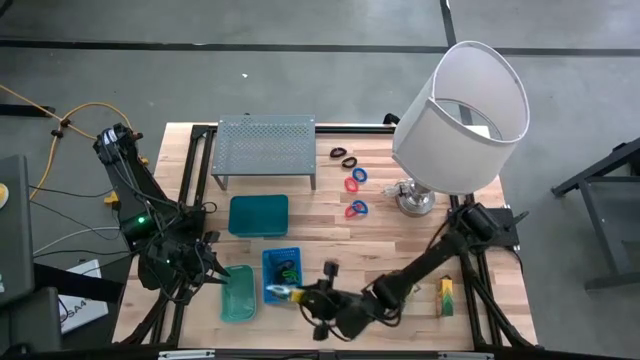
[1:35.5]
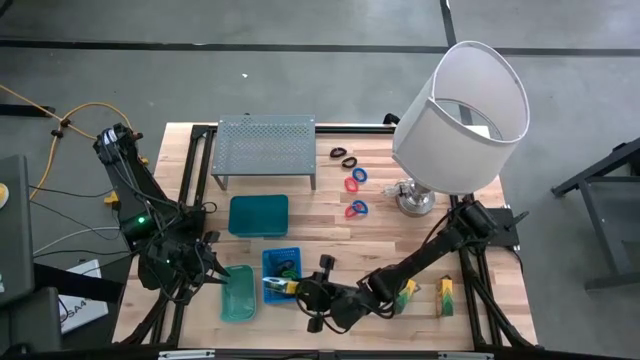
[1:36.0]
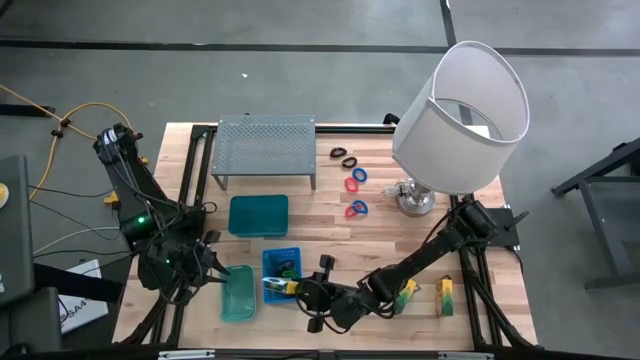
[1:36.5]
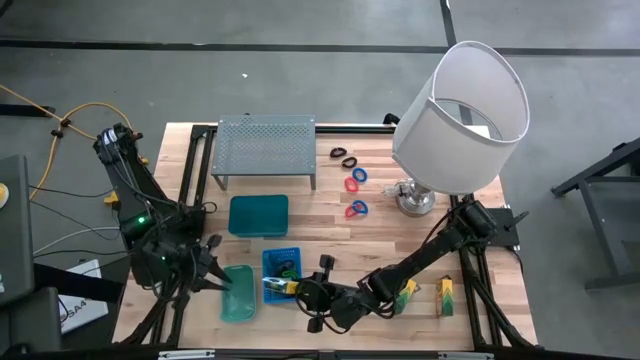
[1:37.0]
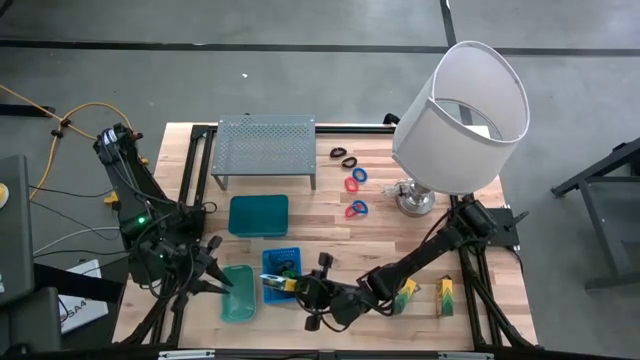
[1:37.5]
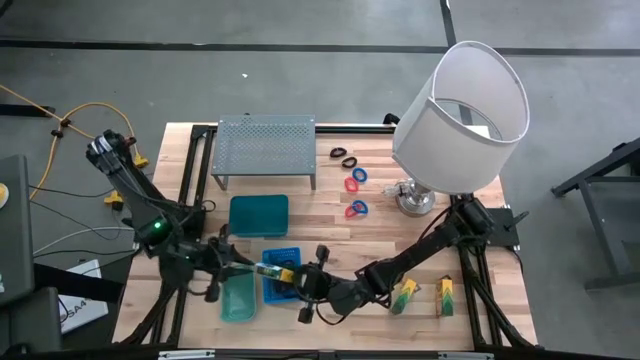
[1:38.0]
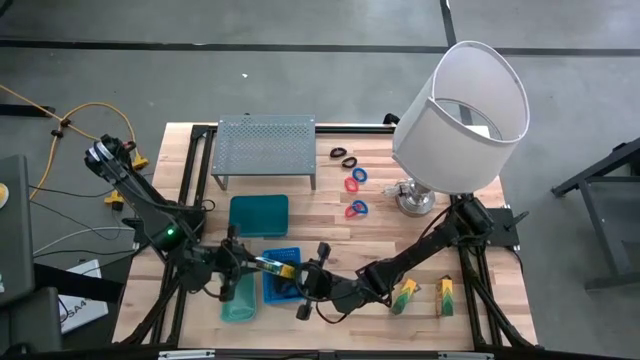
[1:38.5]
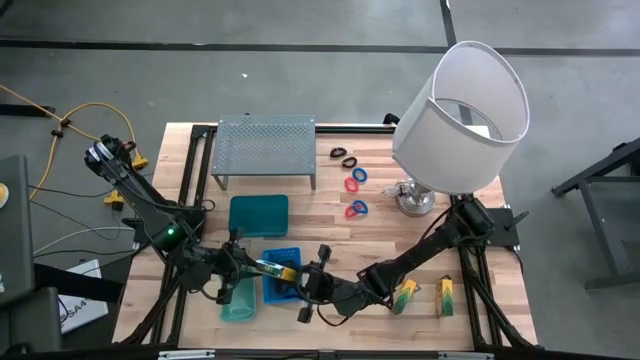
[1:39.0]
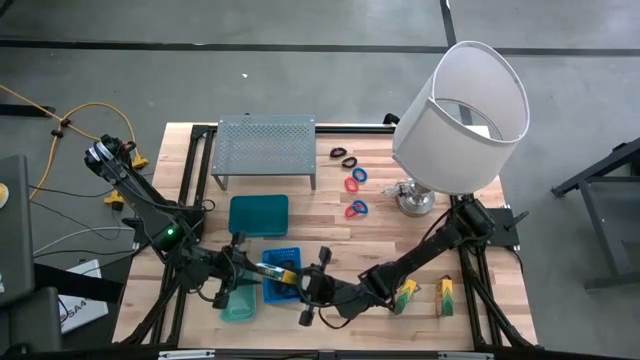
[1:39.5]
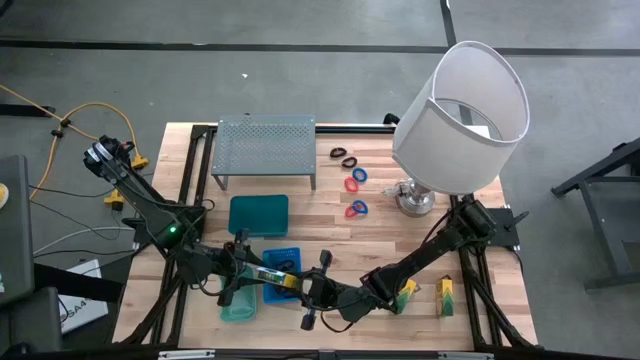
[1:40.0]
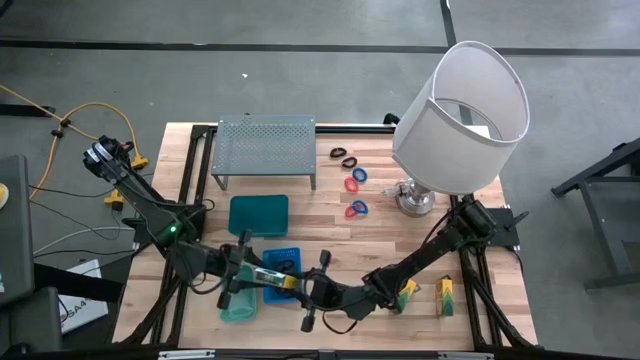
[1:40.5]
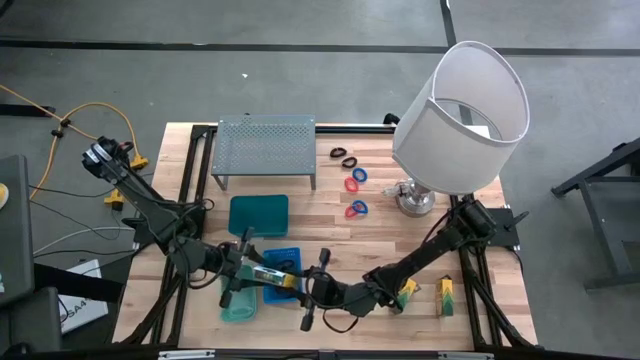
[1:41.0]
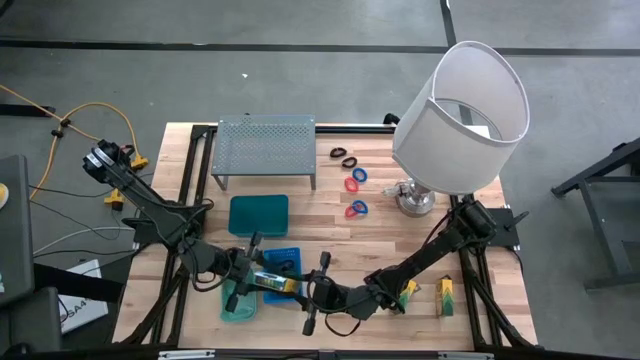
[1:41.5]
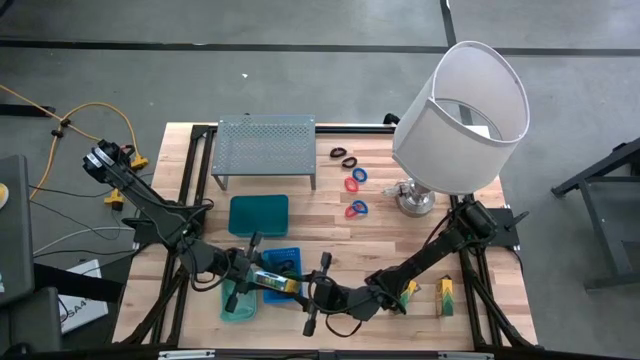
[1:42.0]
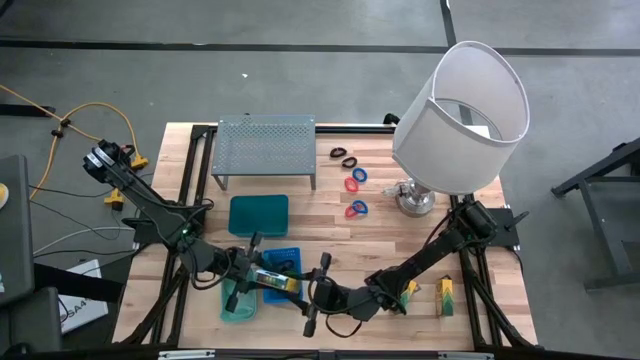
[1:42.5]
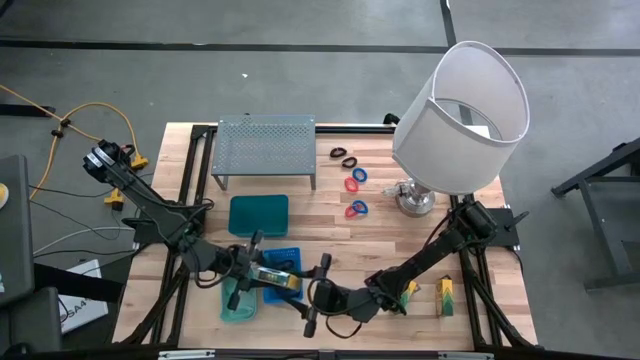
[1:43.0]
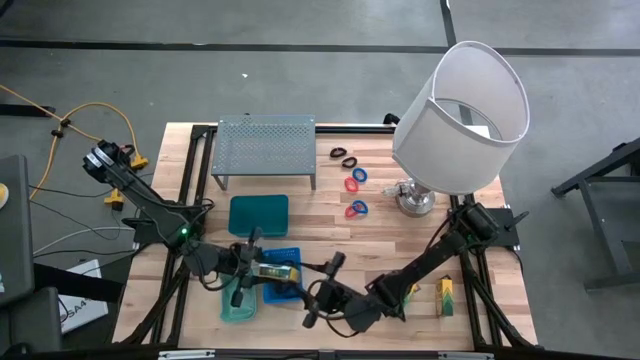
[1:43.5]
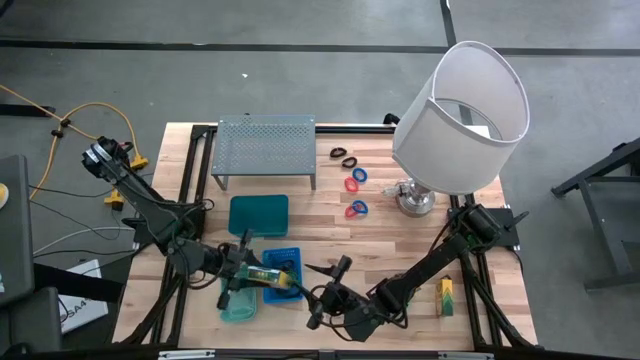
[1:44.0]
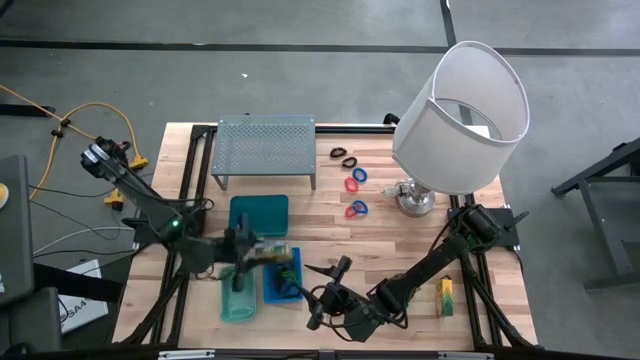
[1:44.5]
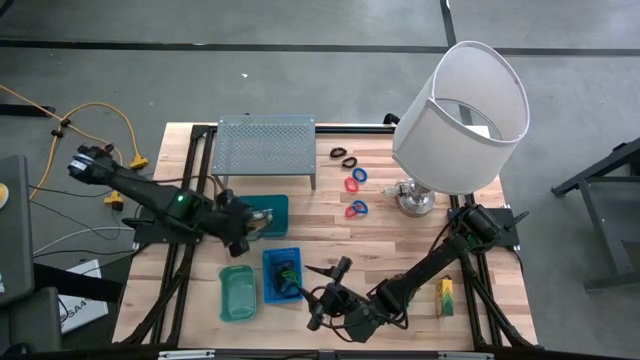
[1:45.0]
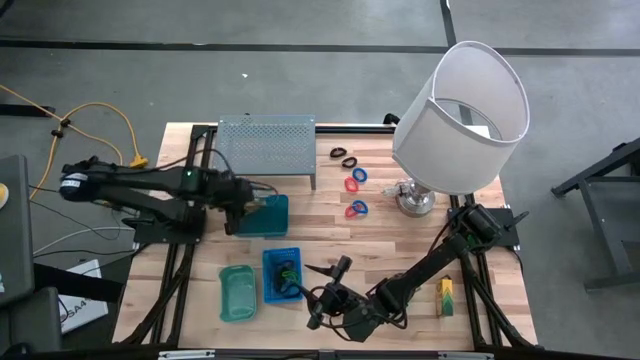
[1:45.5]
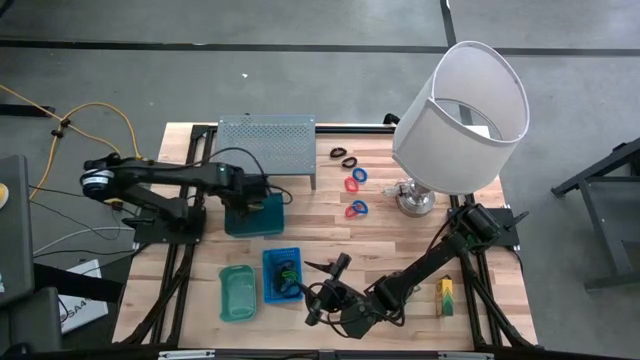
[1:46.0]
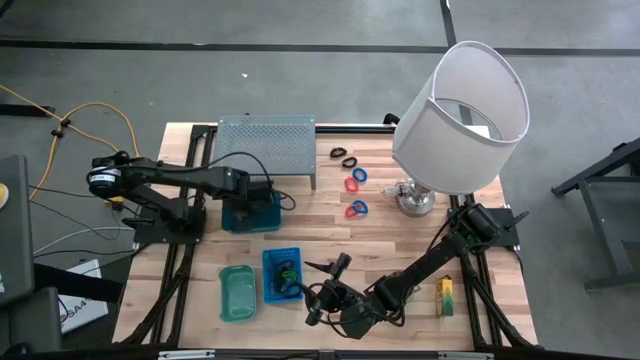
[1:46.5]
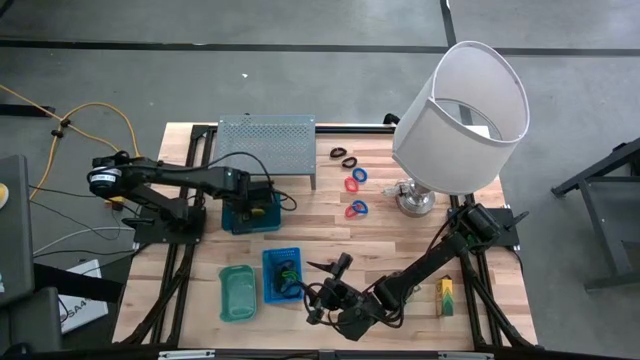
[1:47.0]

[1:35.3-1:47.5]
Task: Pick & Place Office Desk Supplies
Put the middle crayon box into the top blue bin

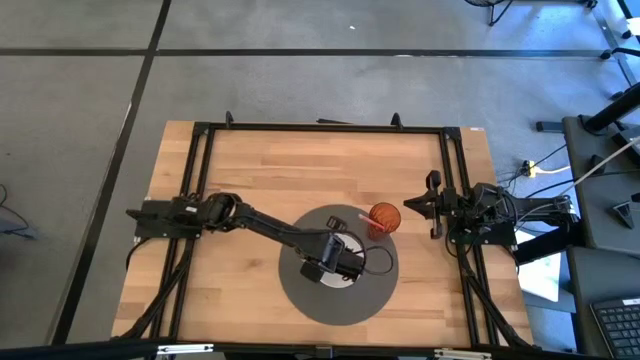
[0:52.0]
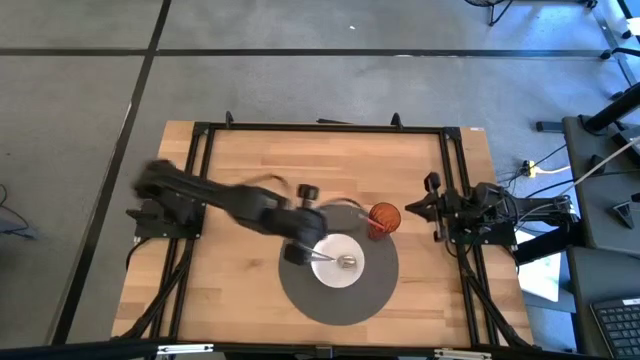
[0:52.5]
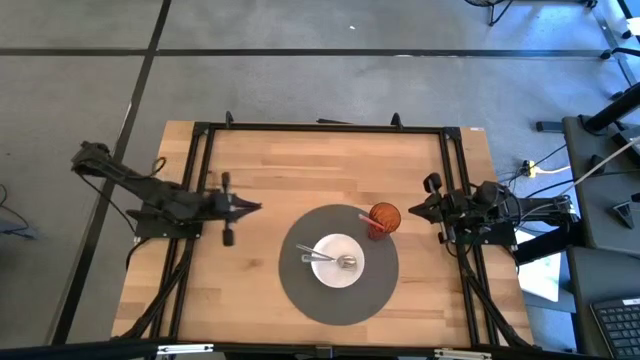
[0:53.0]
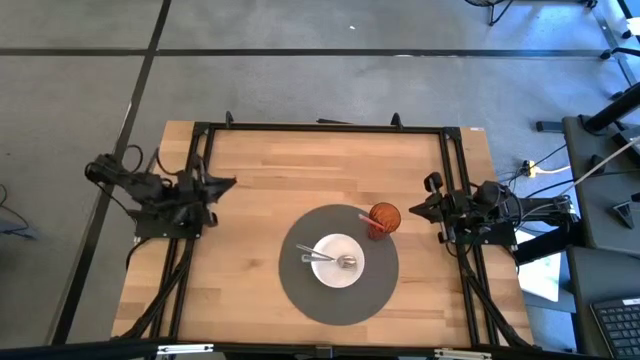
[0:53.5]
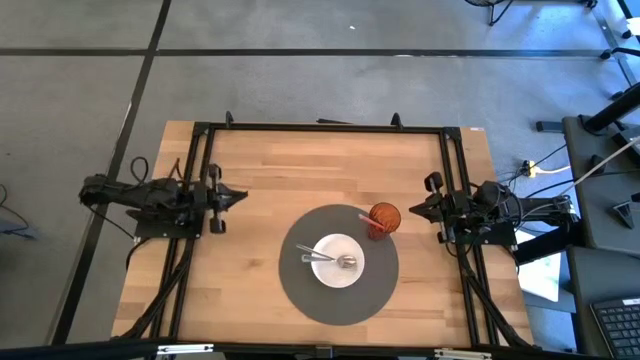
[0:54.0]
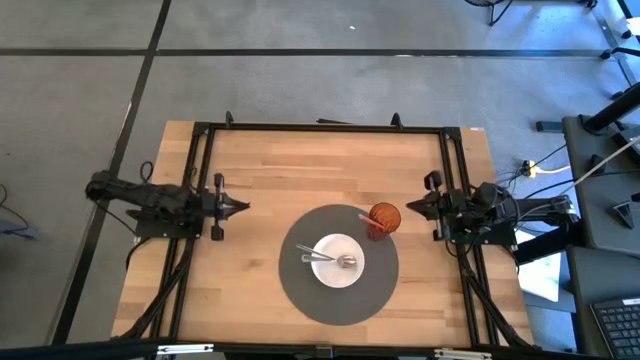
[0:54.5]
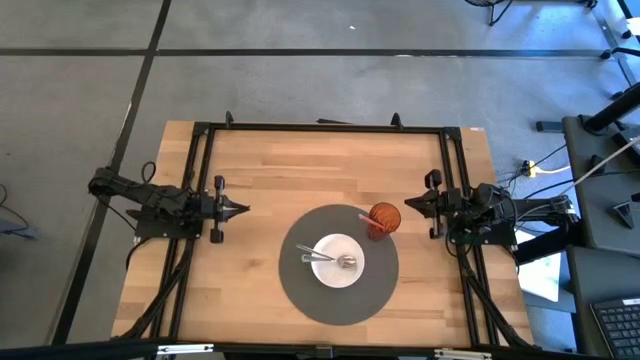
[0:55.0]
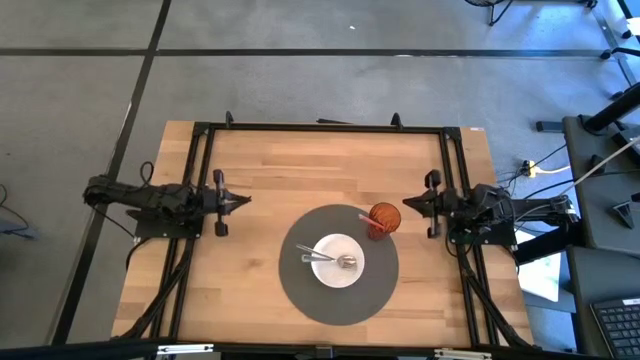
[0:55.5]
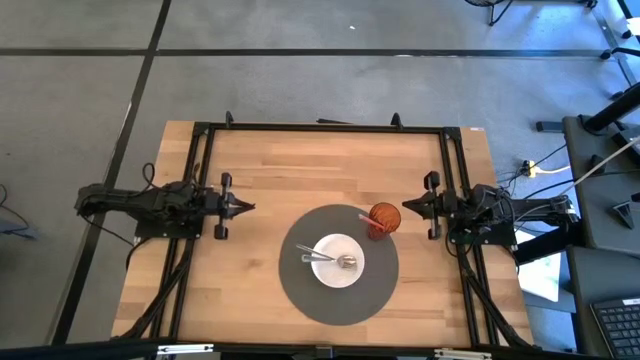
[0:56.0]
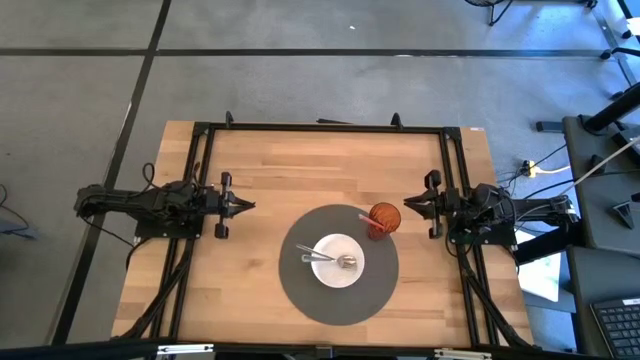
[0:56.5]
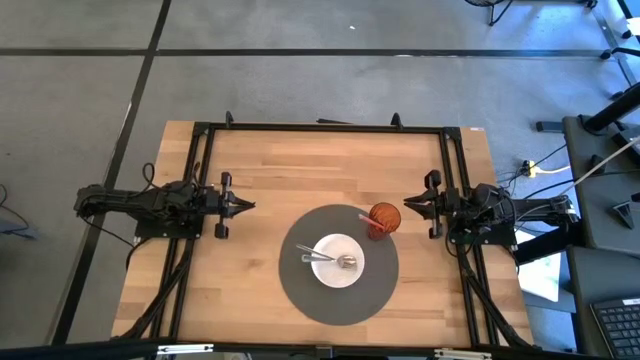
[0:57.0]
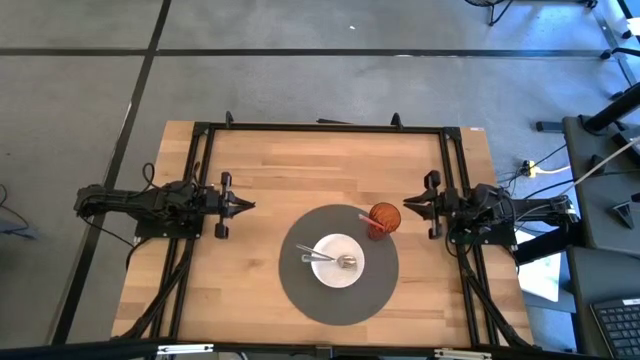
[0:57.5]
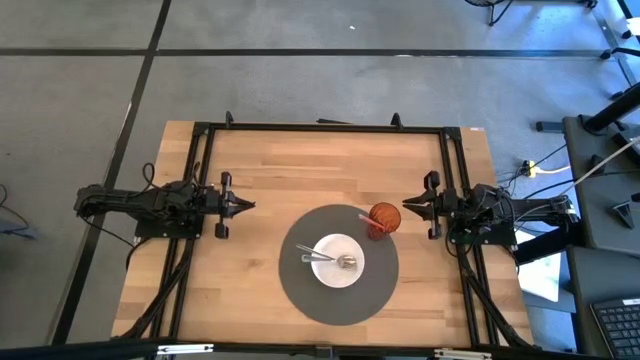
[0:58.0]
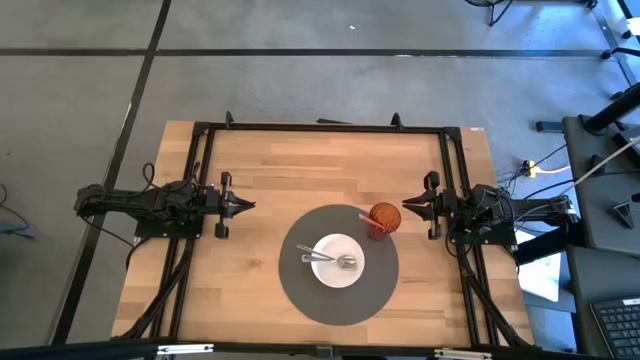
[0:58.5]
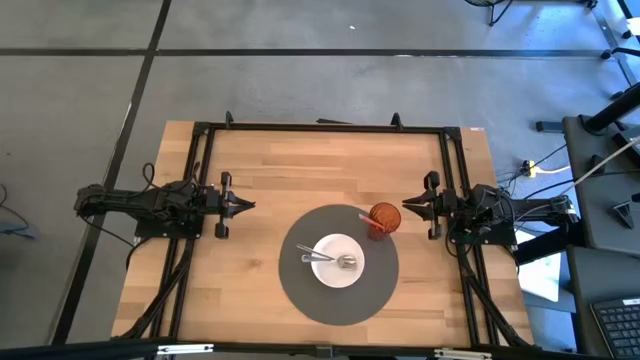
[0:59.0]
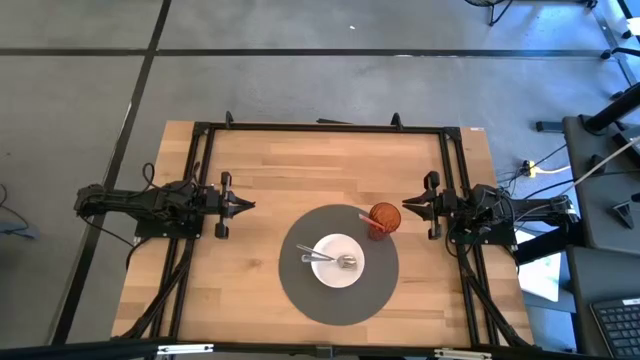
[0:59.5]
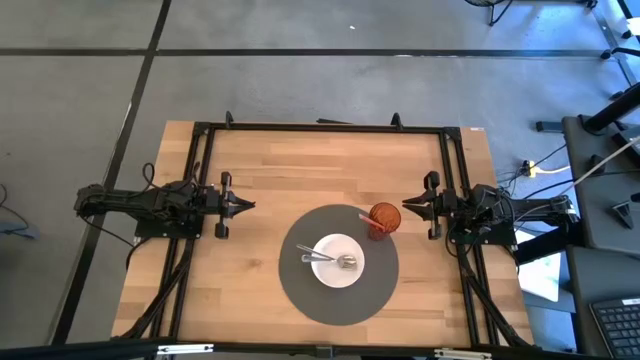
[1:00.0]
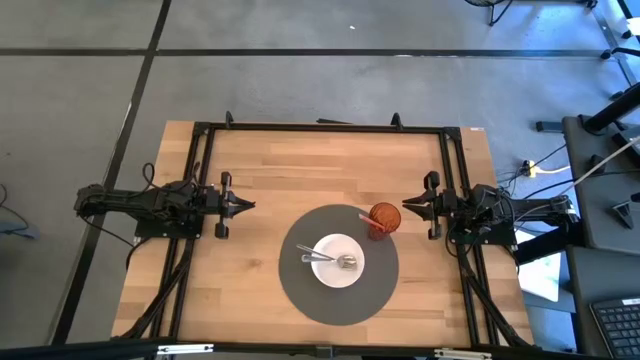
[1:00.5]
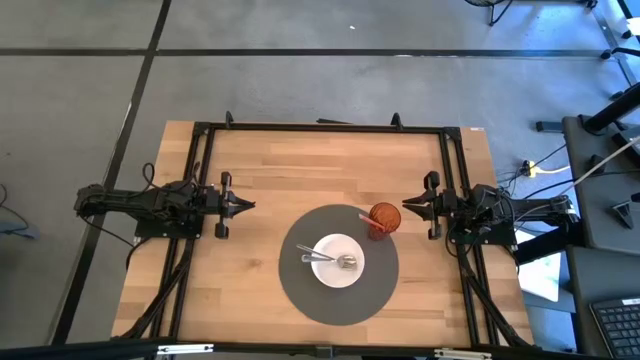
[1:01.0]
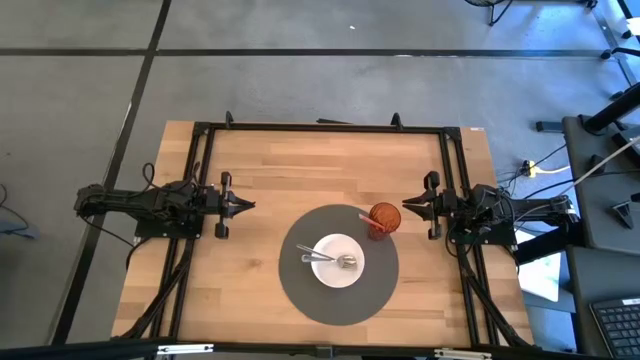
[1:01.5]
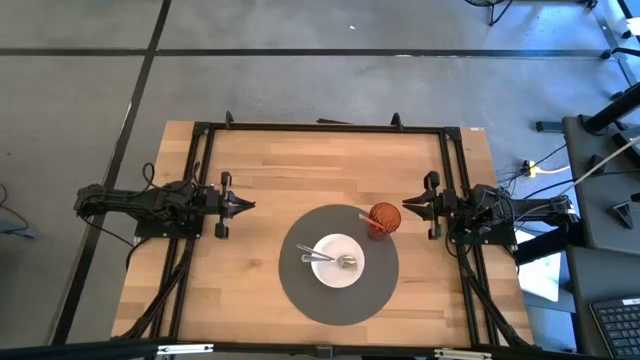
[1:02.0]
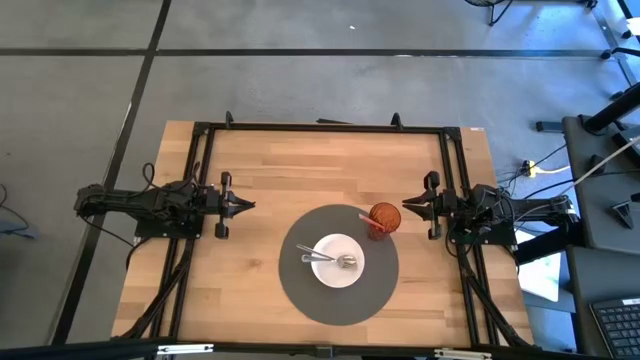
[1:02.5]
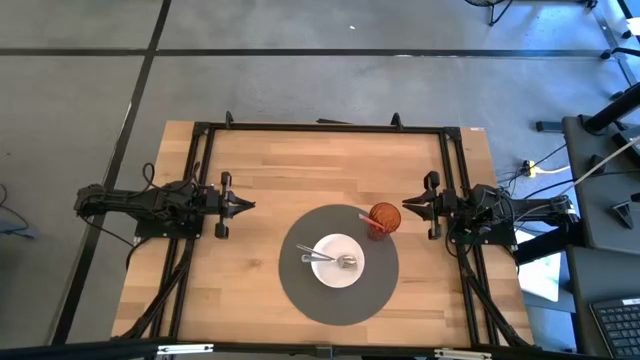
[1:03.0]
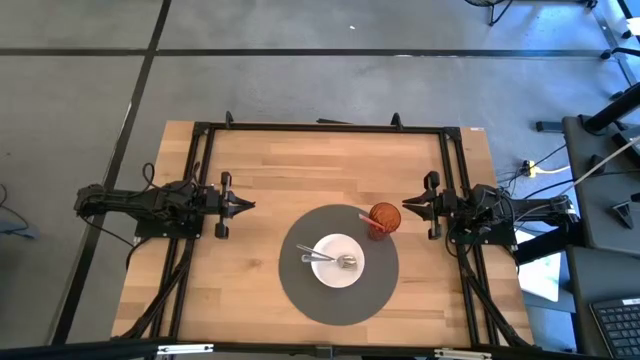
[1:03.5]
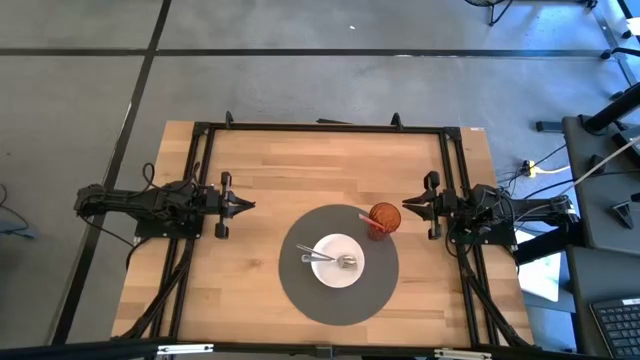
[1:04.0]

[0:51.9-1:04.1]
Task: Pick & Place Utensil
Return to Home Position
